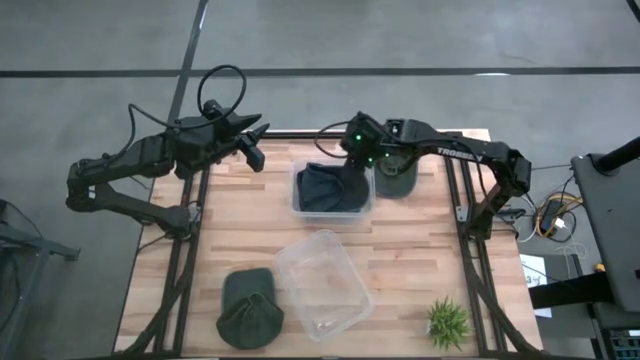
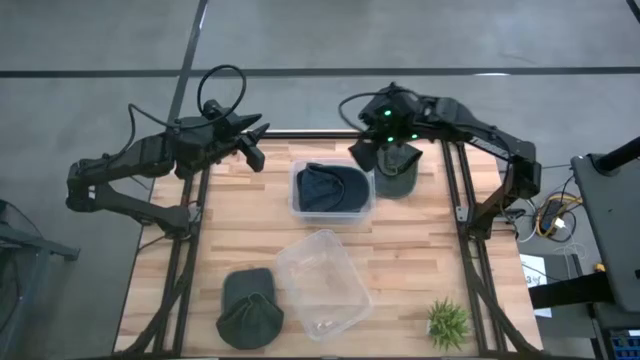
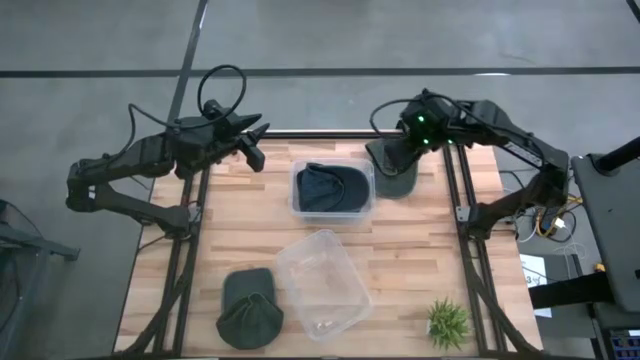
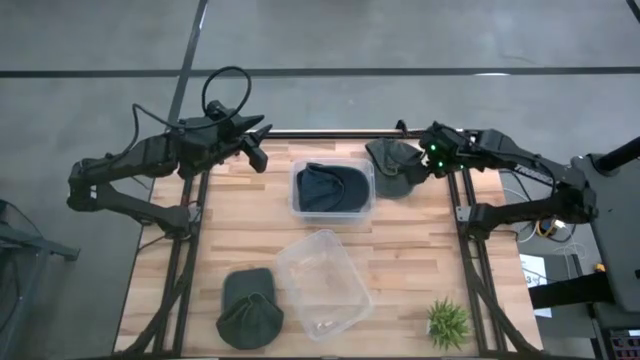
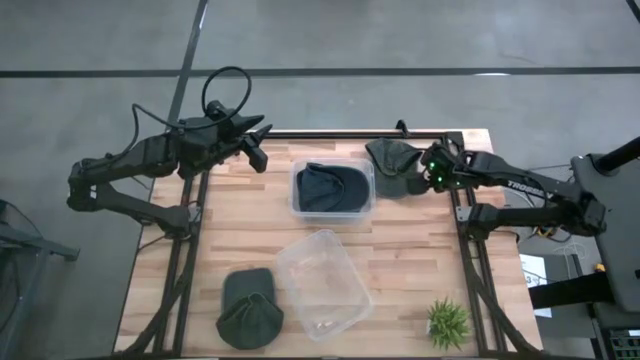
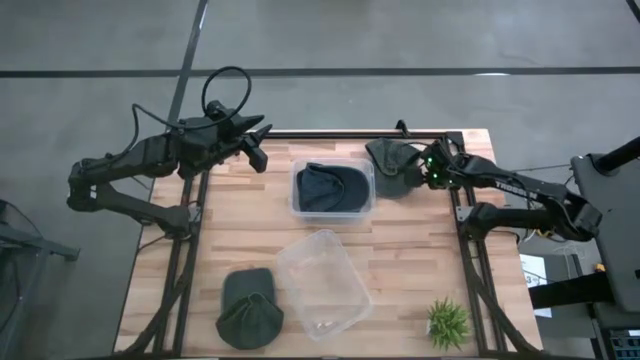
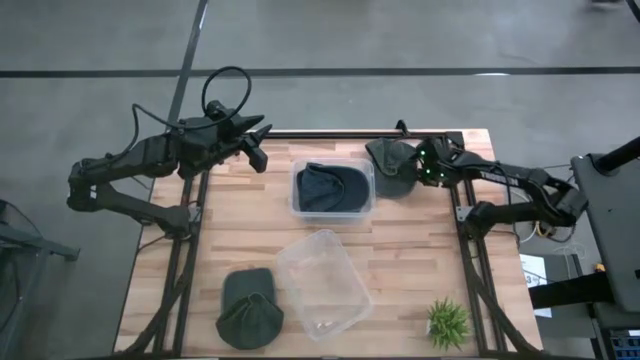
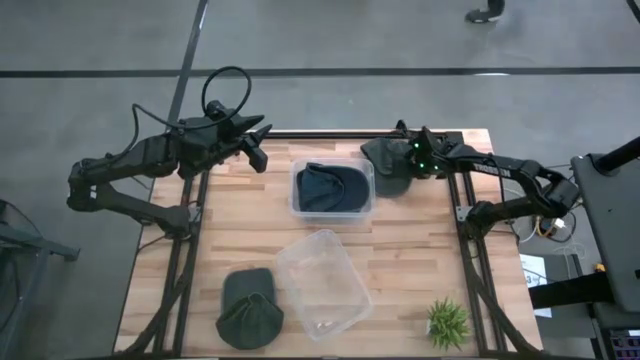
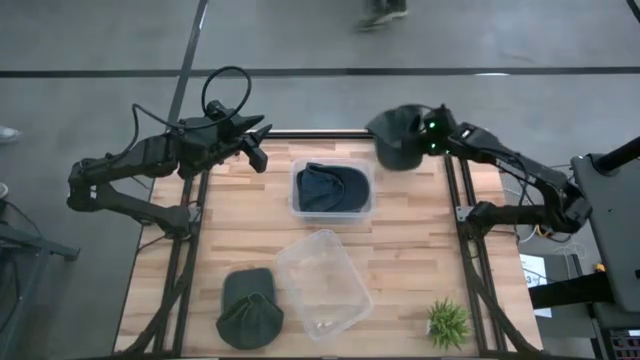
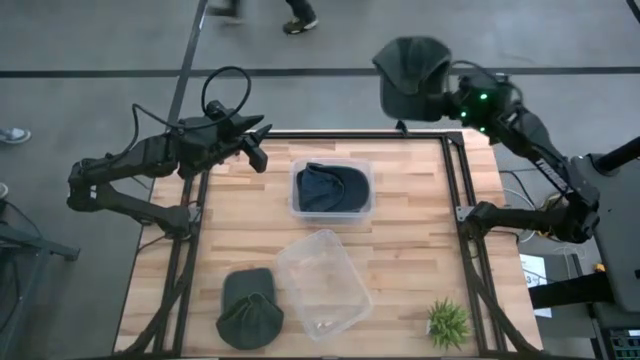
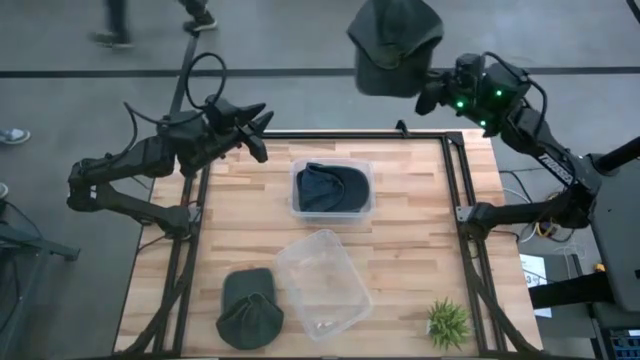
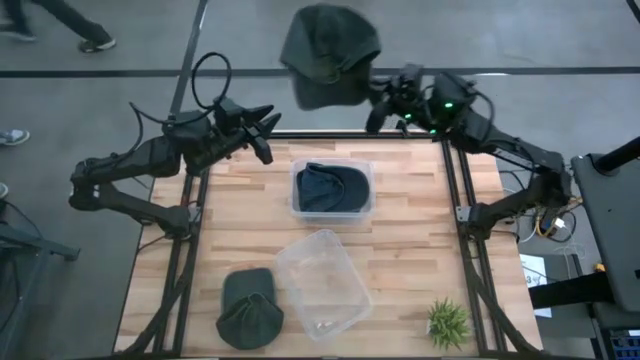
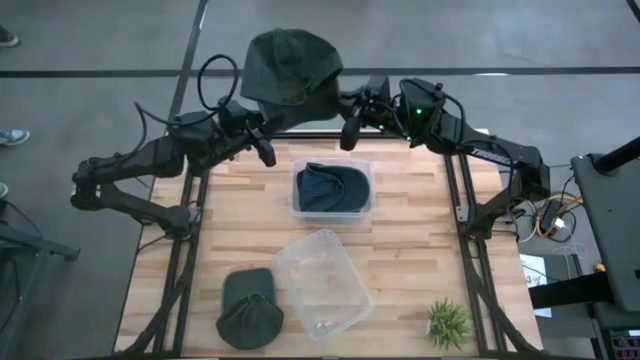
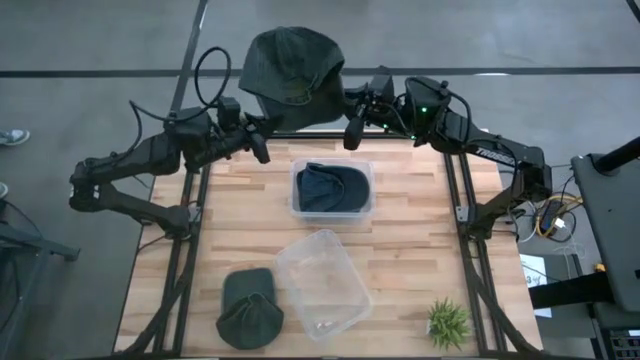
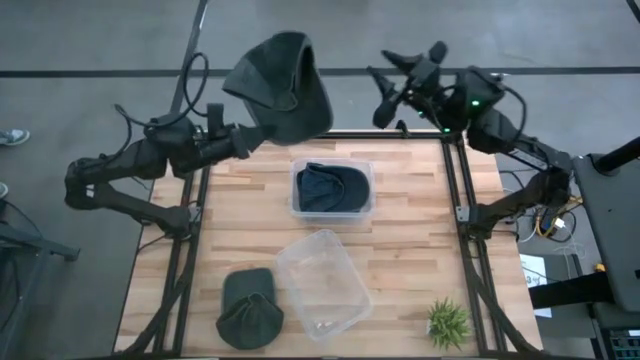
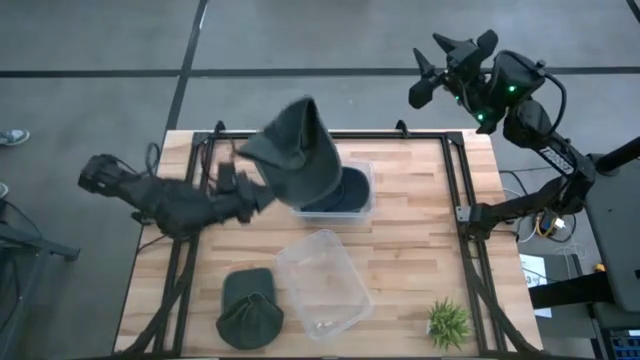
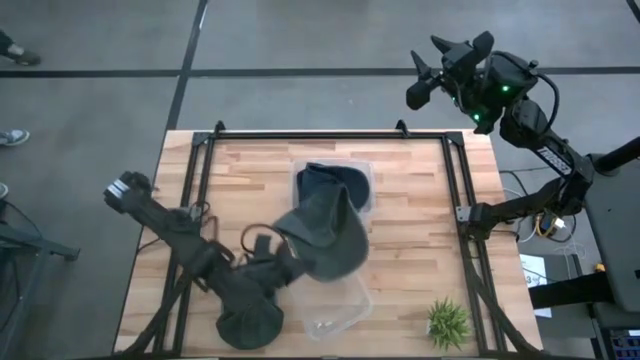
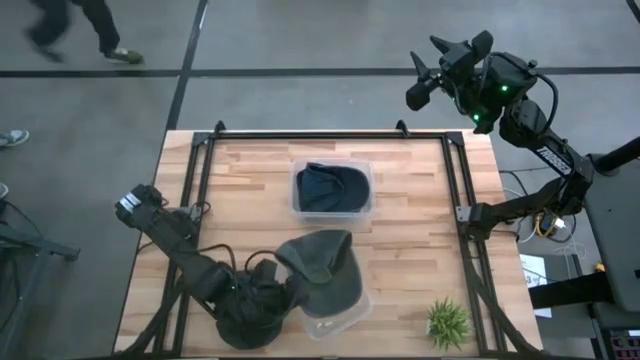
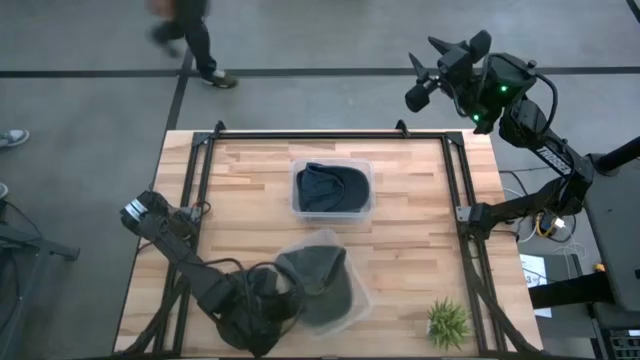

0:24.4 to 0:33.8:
Task: Pick and place caps into container
Put the top gray cap into the bottom transparent container

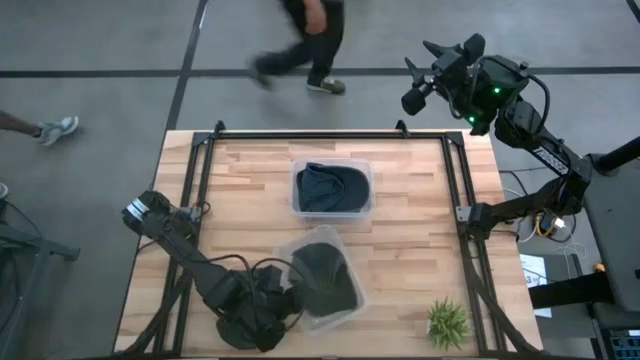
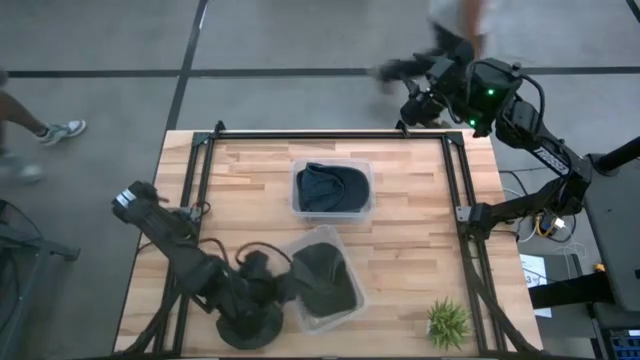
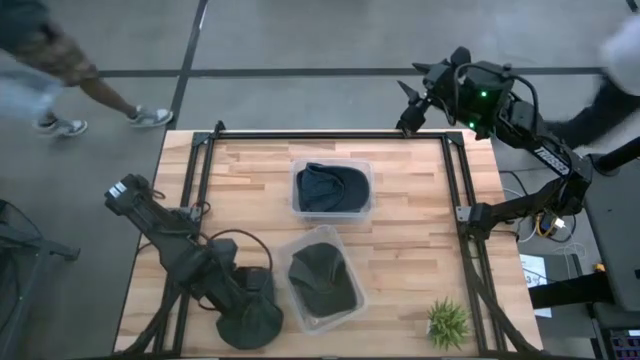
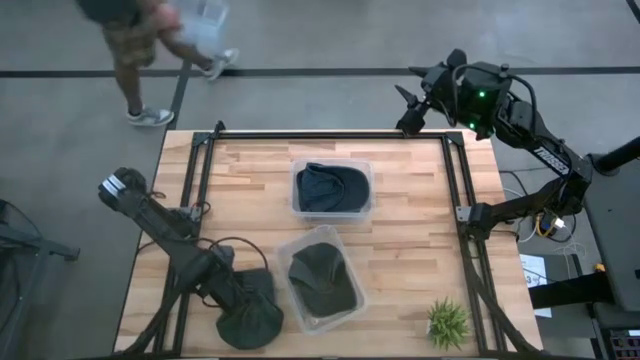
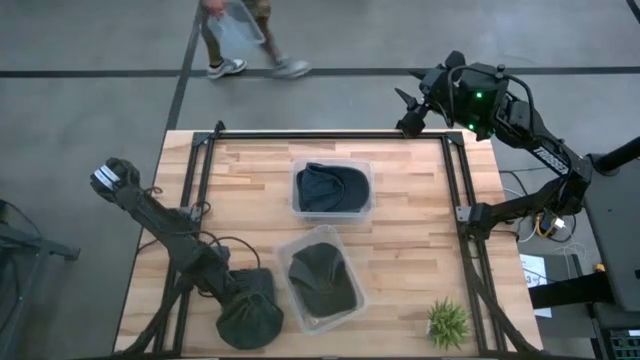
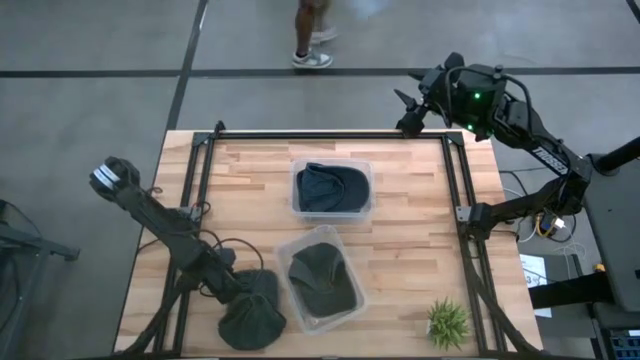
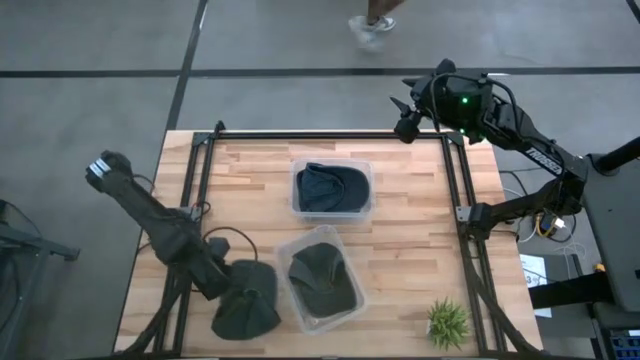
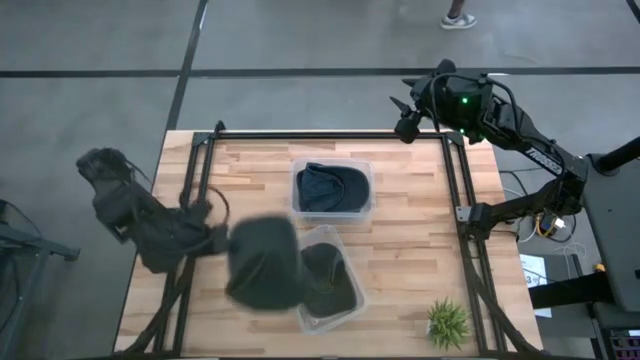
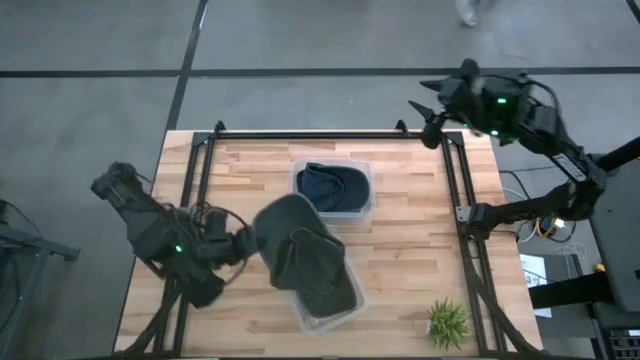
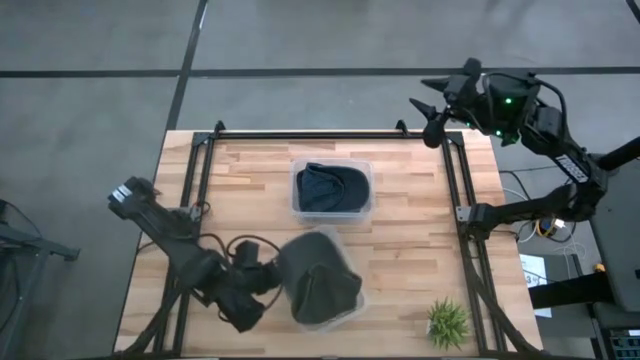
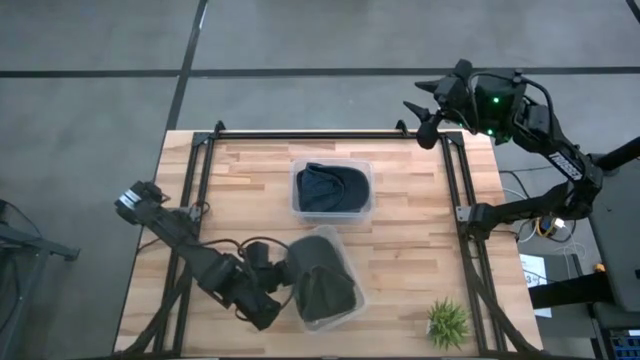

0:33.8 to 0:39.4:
Put the gray cap into the bottom transparent container

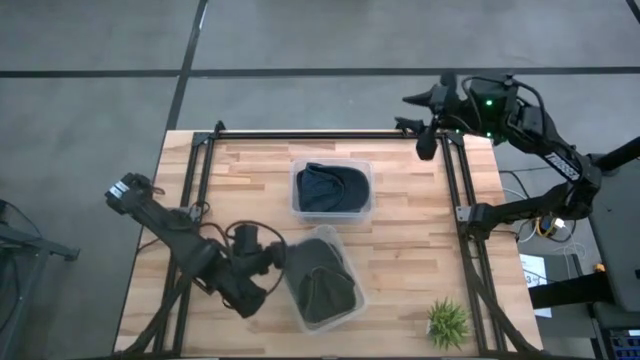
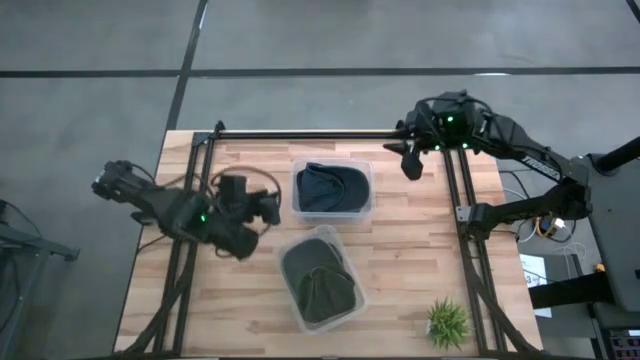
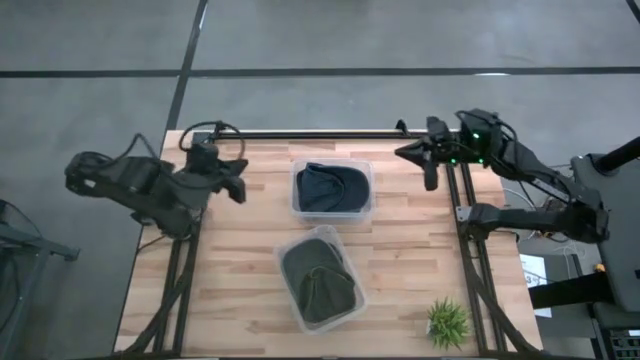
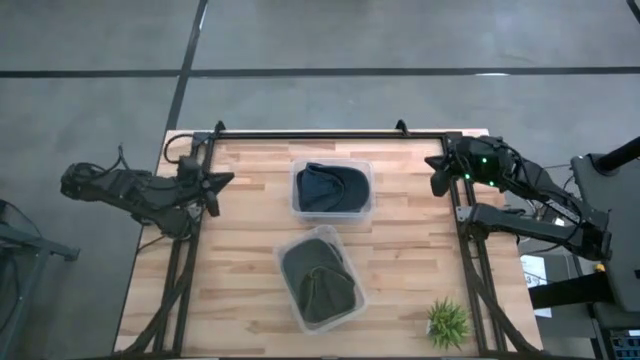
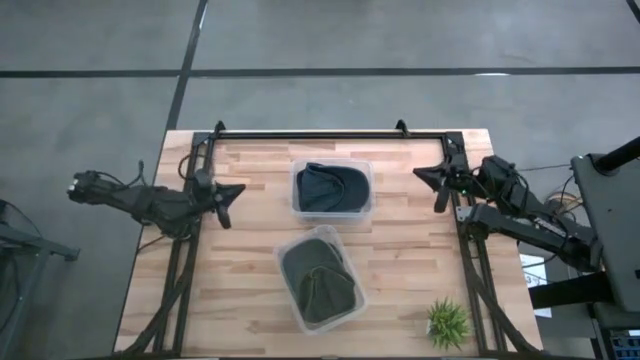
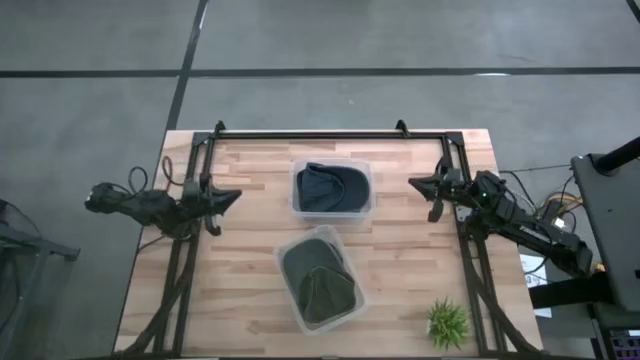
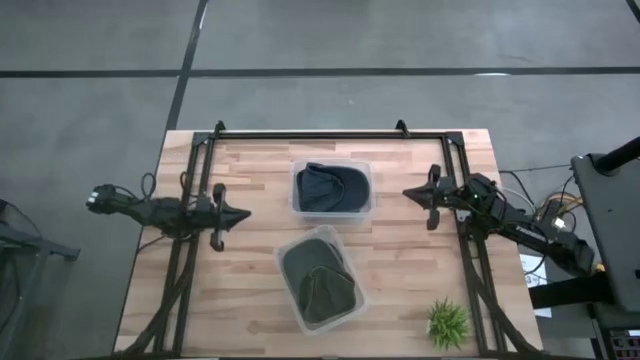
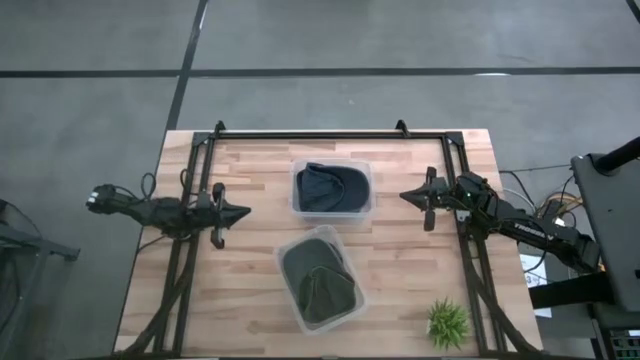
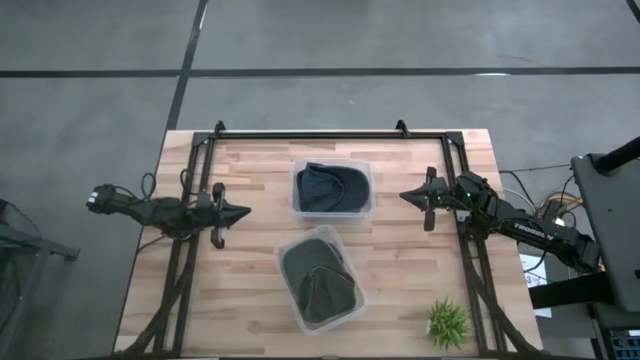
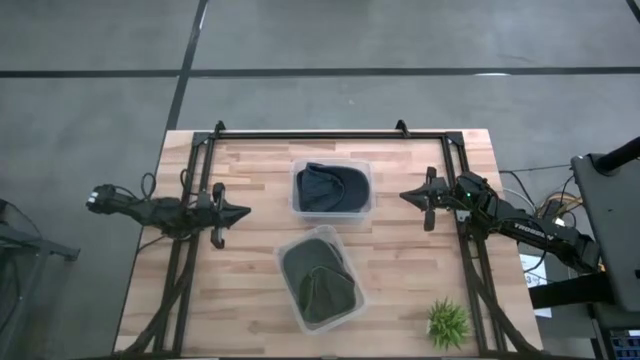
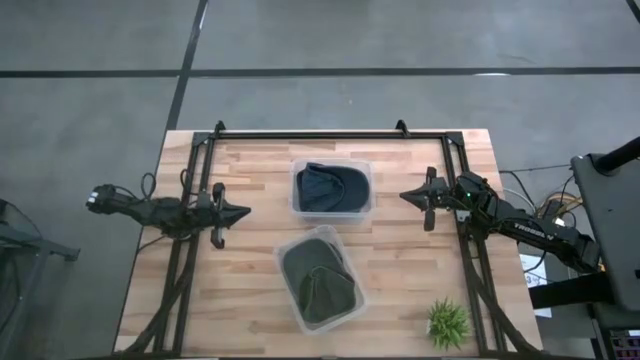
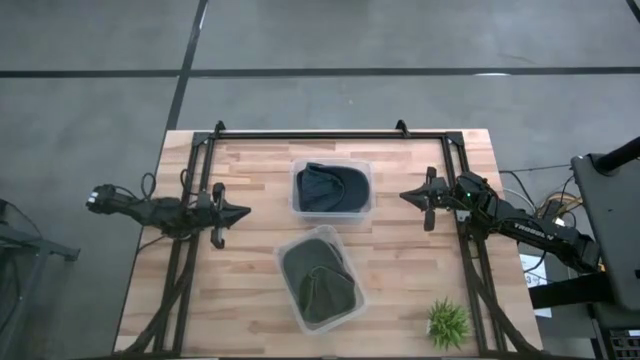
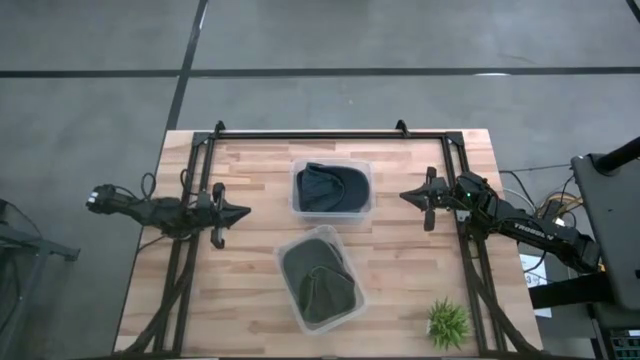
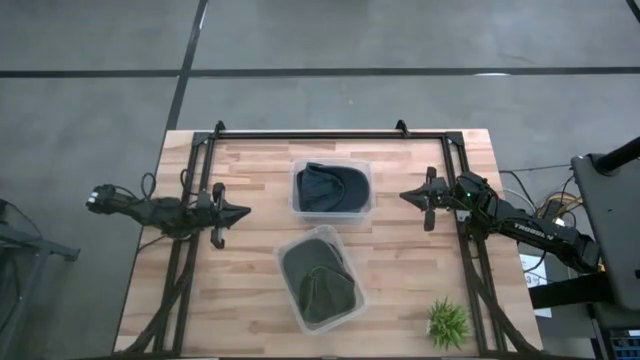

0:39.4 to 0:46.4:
Return to Home Position
